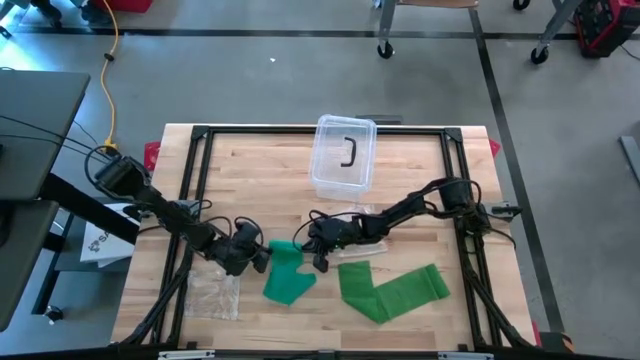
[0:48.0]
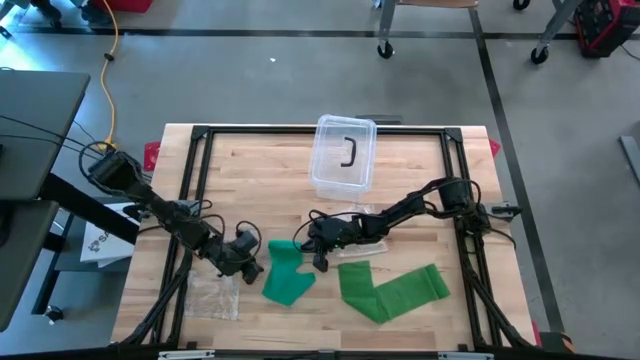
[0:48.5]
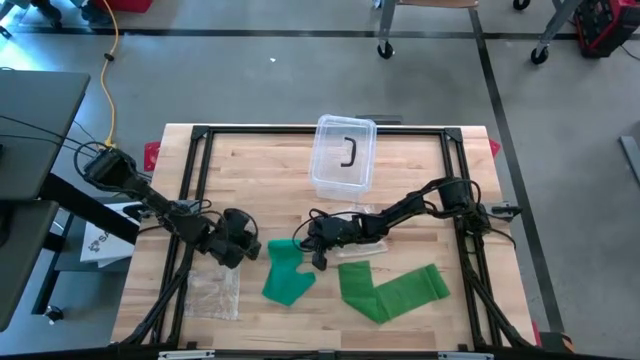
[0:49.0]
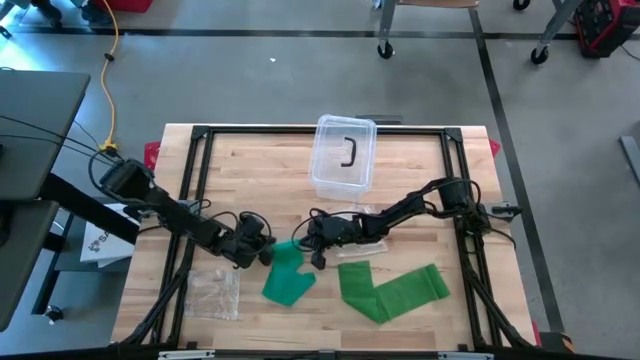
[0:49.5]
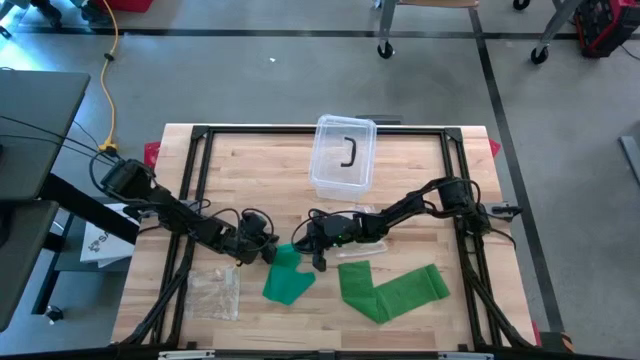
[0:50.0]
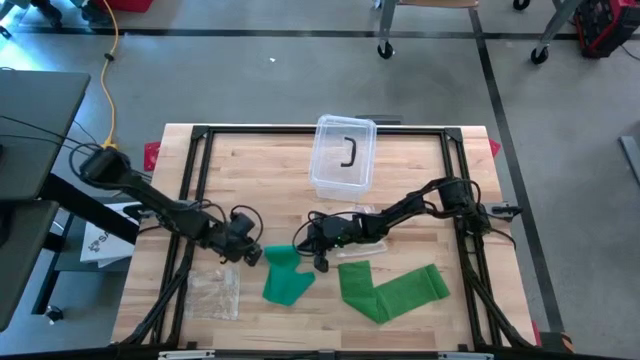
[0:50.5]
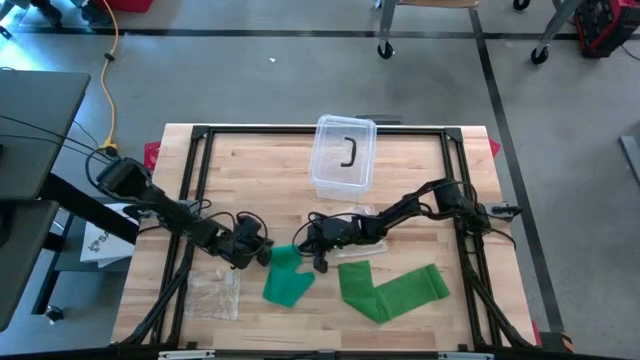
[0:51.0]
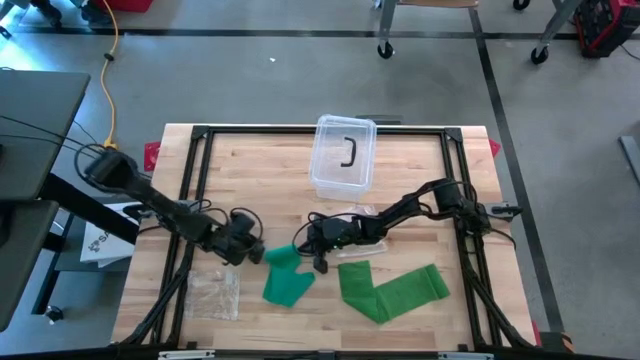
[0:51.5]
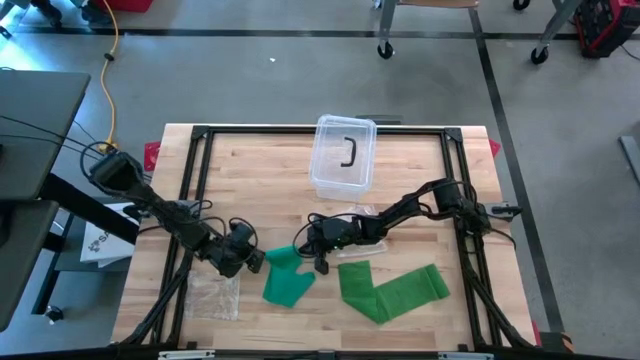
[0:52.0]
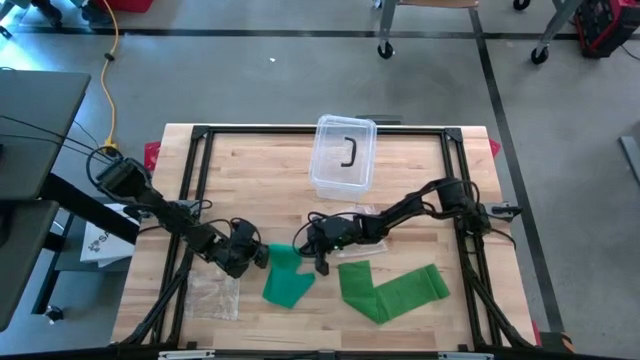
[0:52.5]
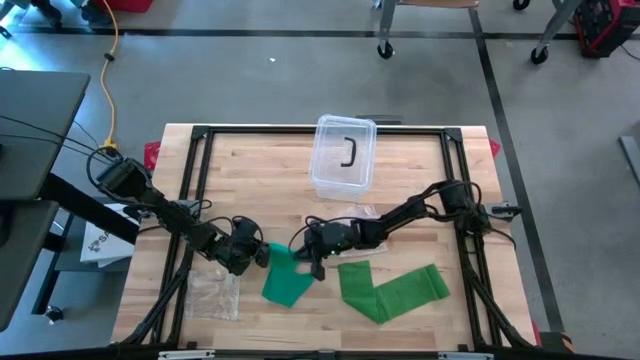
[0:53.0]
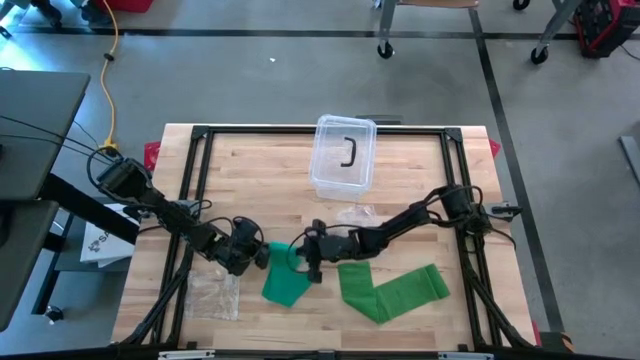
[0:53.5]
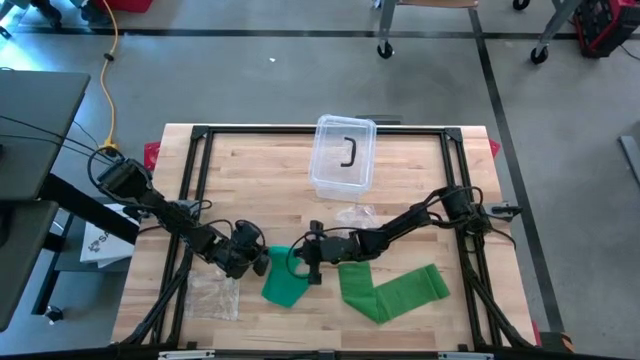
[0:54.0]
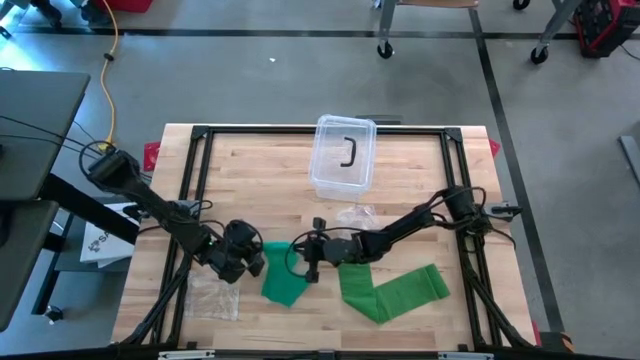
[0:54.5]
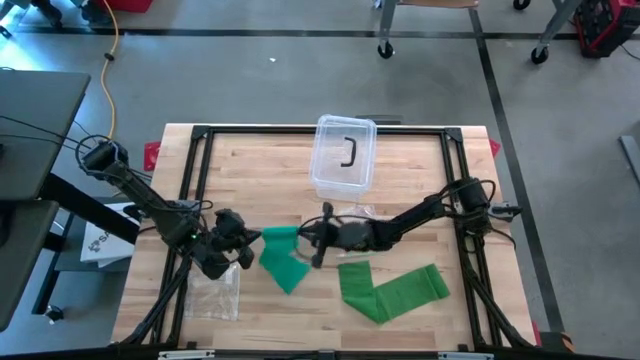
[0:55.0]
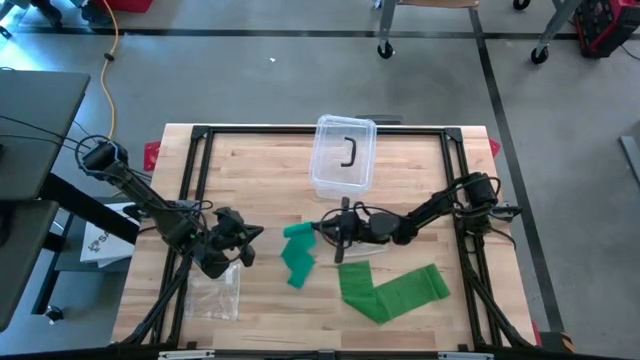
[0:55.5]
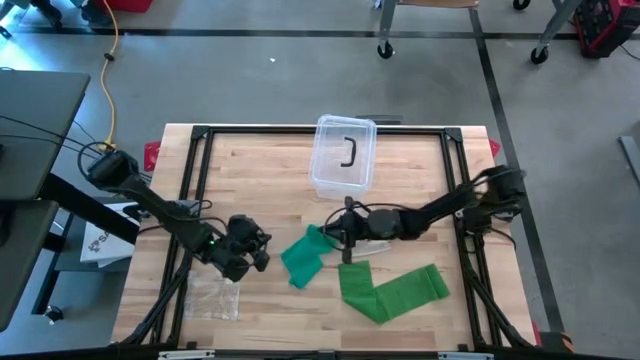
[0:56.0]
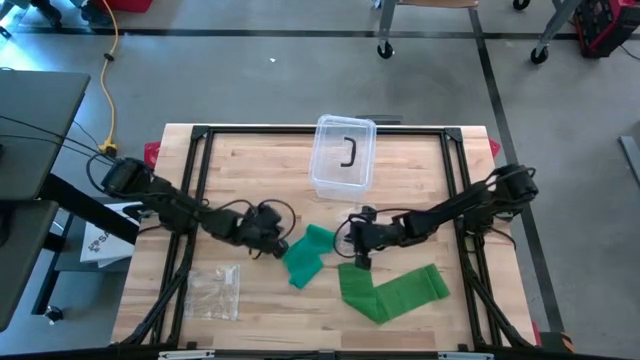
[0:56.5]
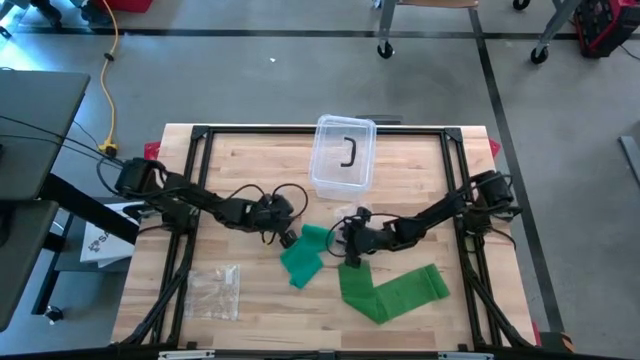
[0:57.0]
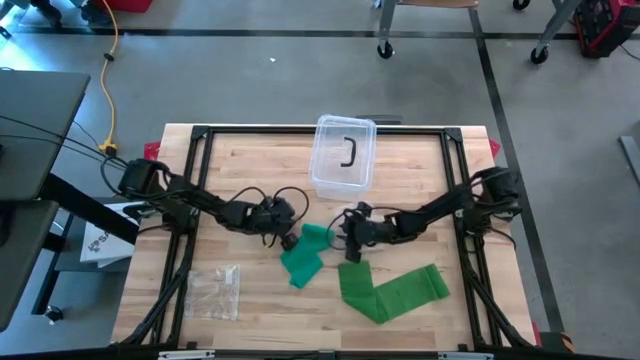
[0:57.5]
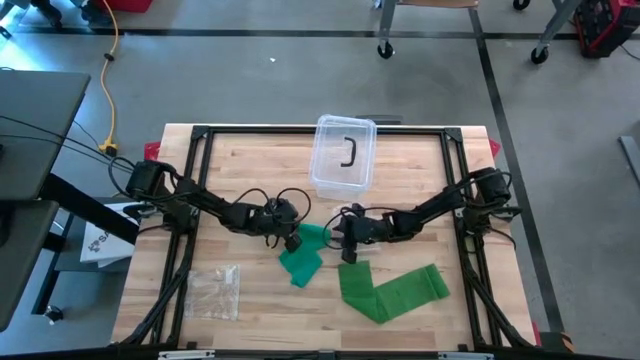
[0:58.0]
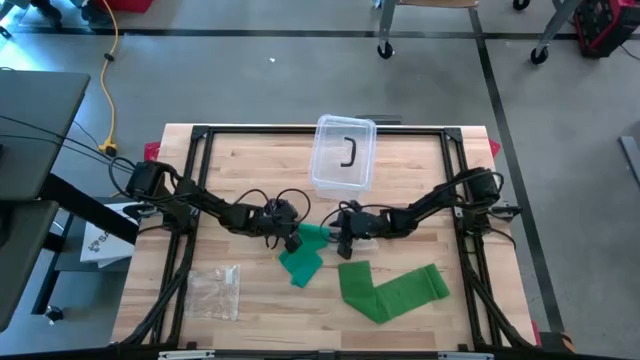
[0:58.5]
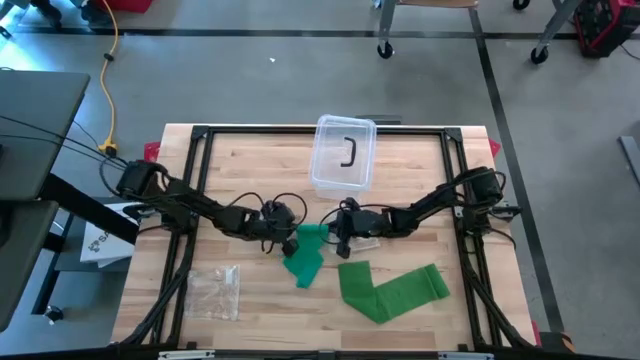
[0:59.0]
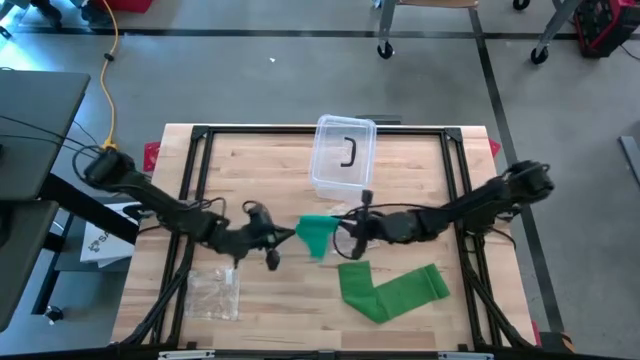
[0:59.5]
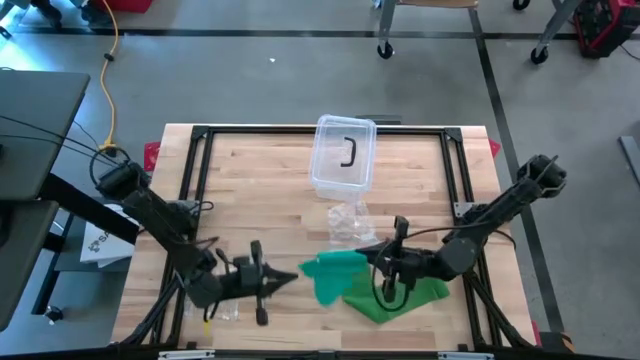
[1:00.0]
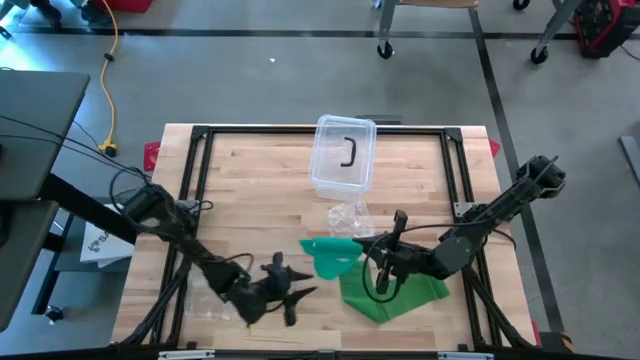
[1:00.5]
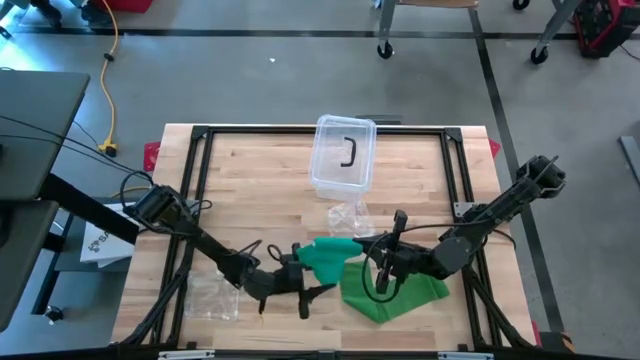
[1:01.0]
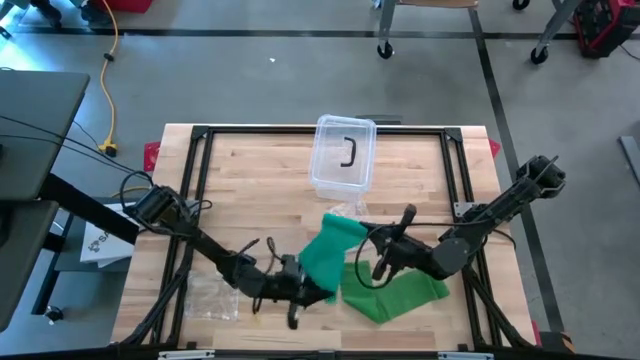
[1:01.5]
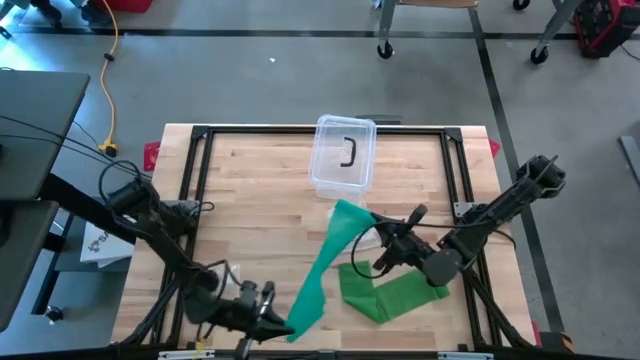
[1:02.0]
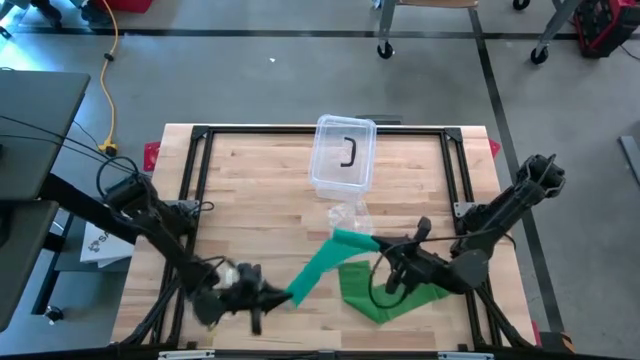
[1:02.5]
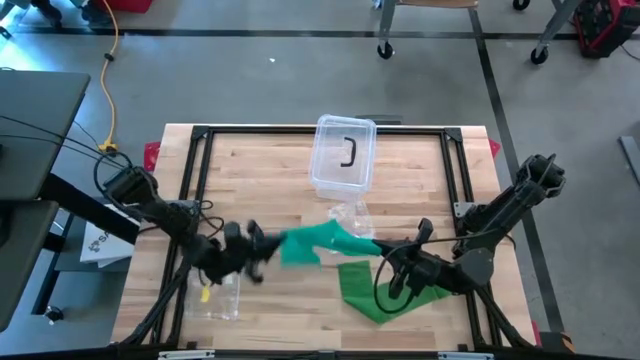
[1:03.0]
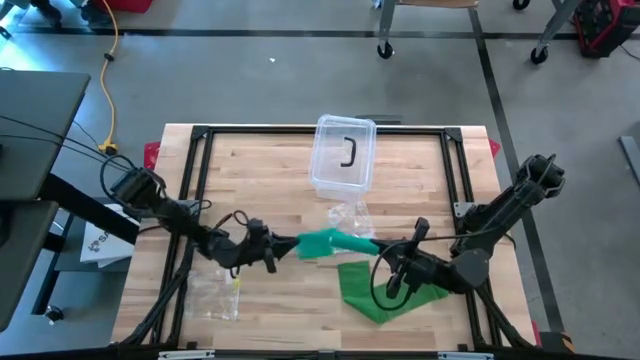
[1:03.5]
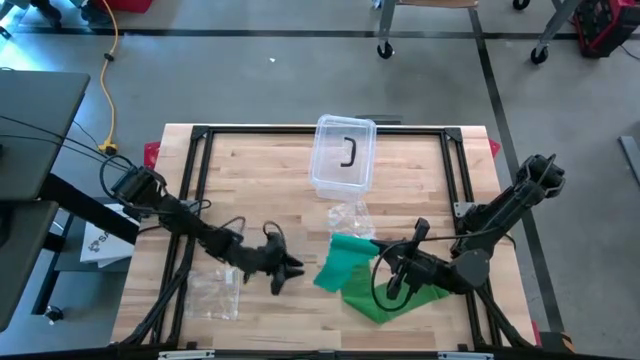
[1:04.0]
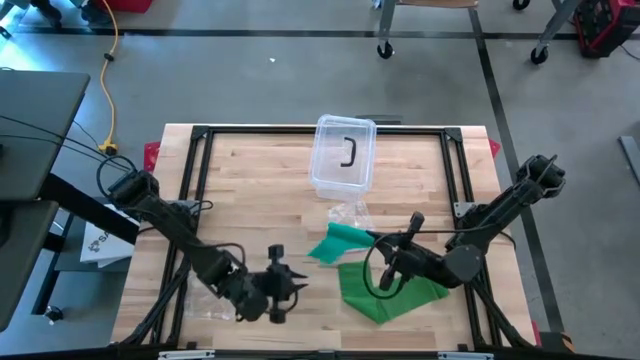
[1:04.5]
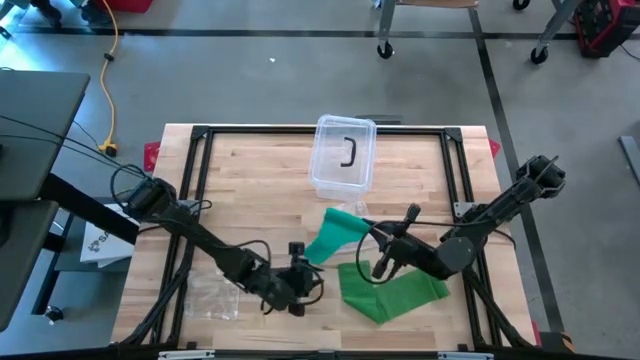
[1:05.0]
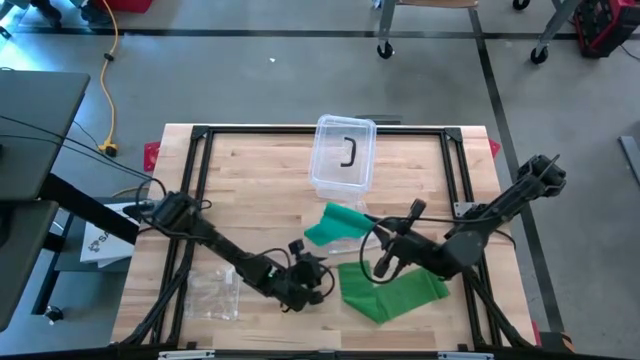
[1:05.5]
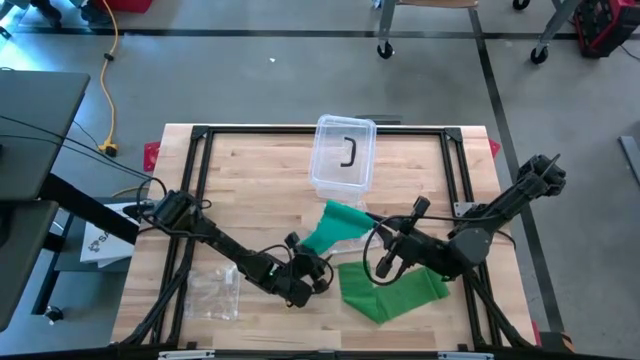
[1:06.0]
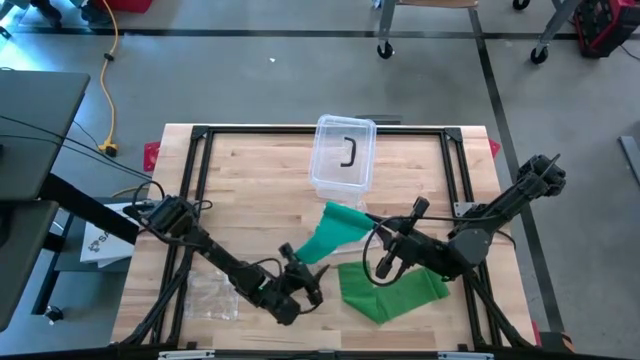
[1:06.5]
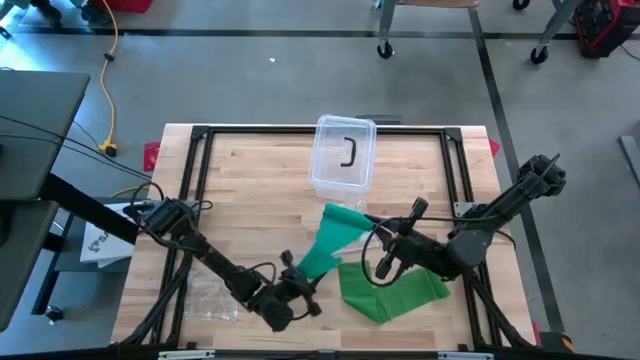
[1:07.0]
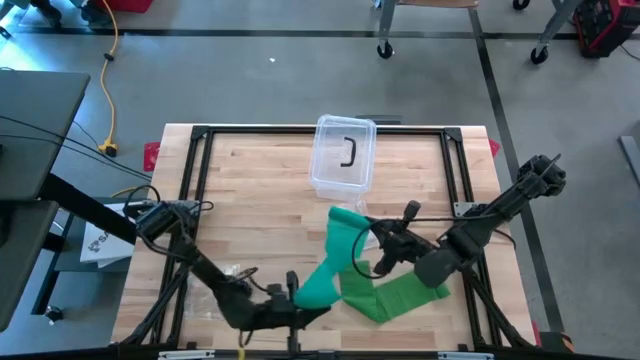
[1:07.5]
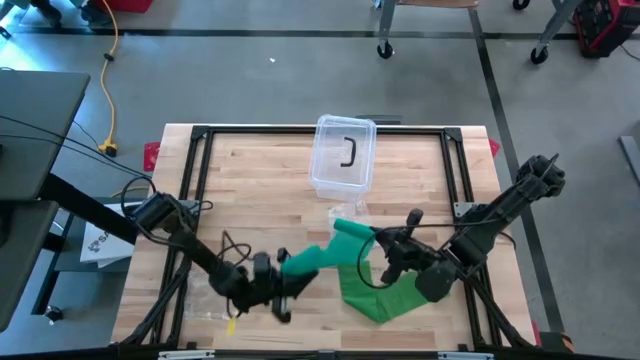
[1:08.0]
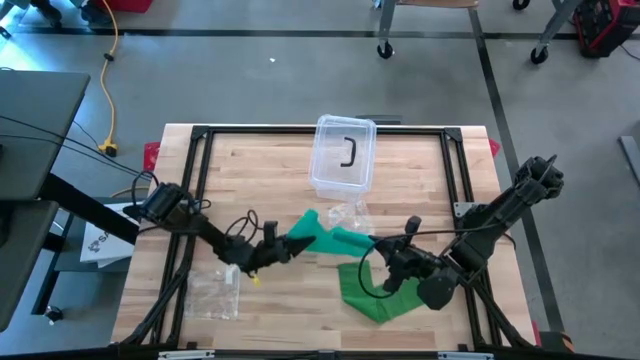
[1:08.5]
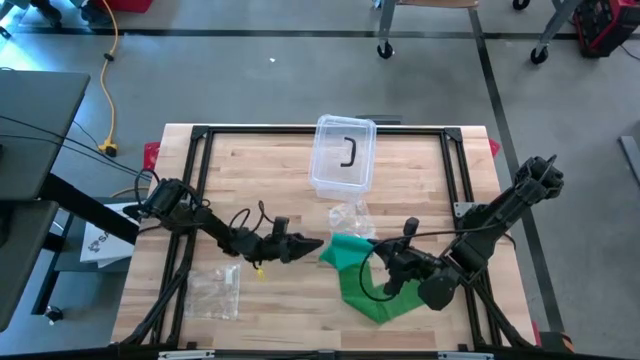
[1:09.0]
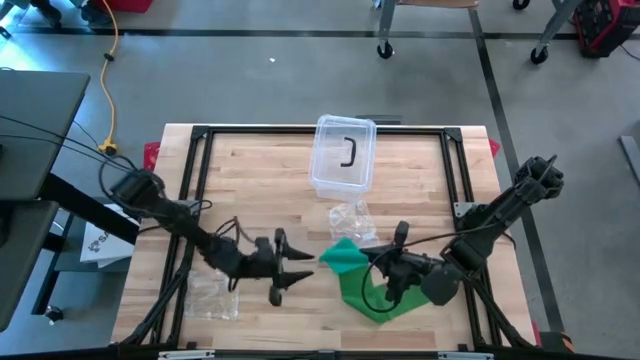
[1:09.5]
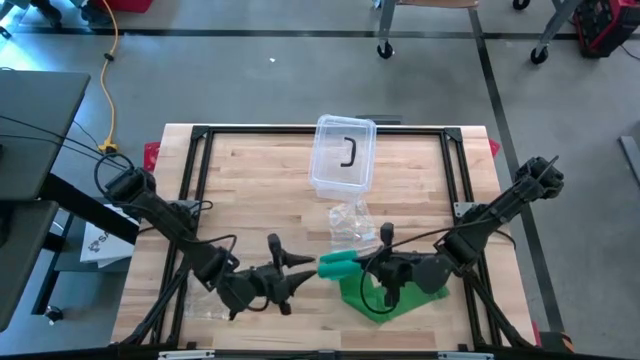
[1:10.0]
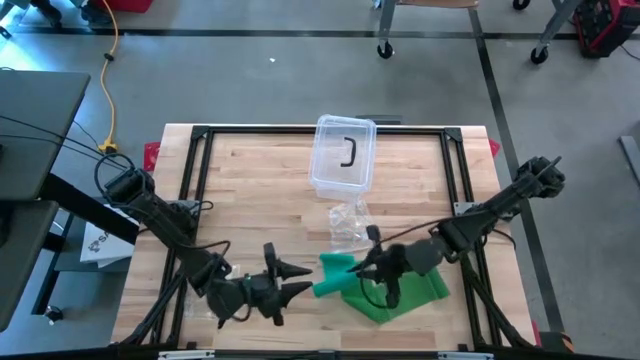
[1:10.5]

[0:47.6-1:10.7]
Task: Roll bandage
Roll the blue bandage
